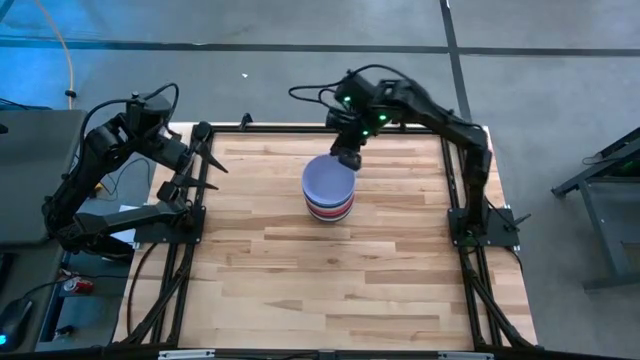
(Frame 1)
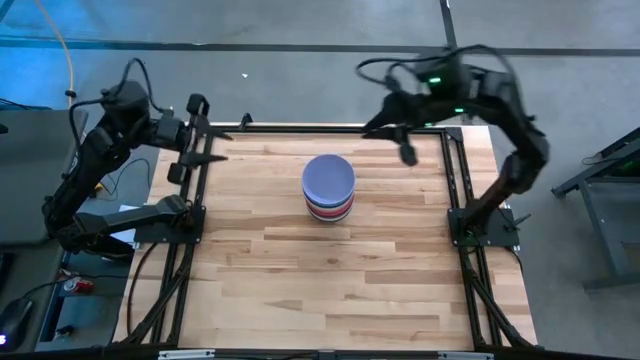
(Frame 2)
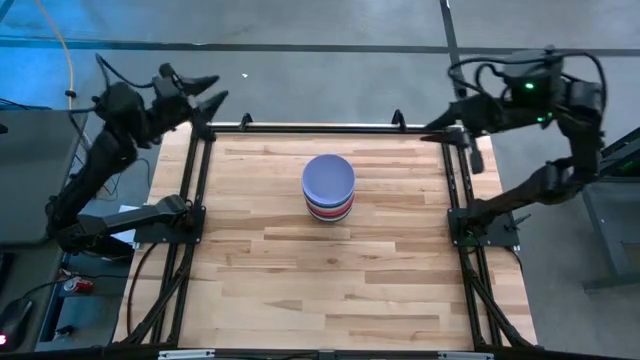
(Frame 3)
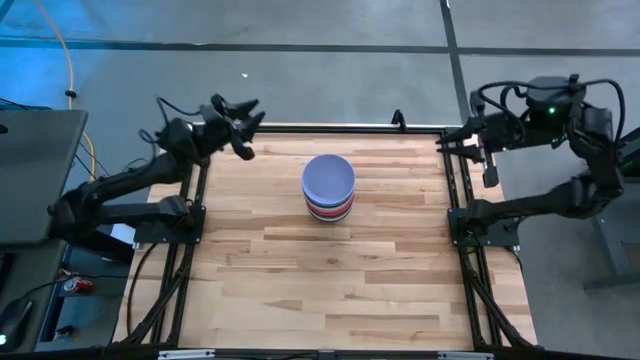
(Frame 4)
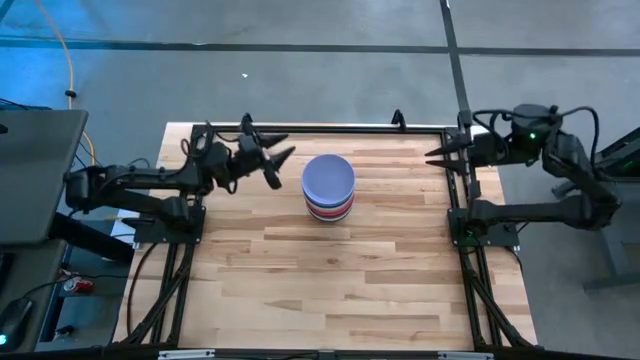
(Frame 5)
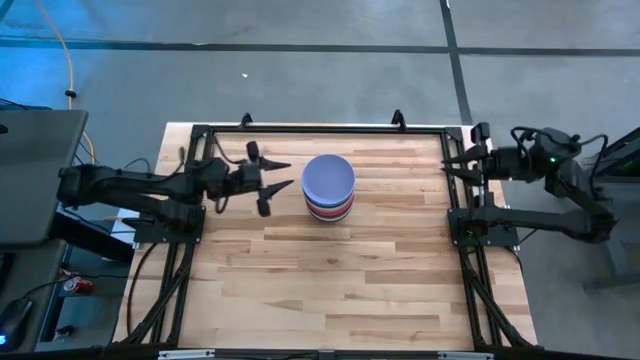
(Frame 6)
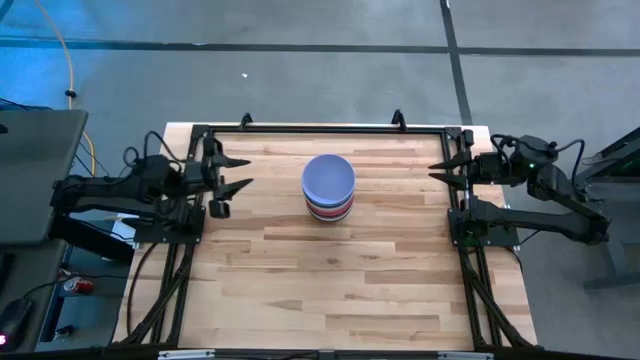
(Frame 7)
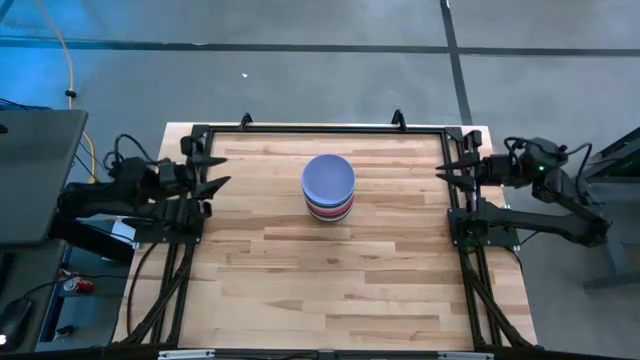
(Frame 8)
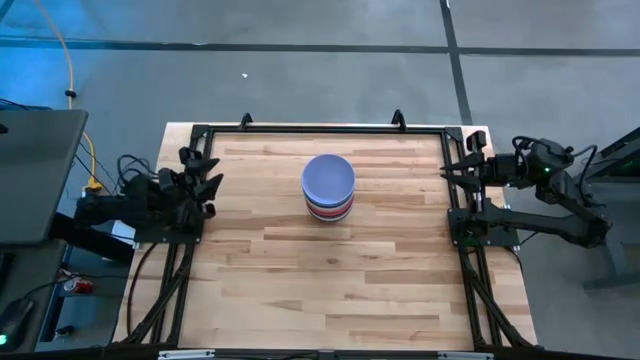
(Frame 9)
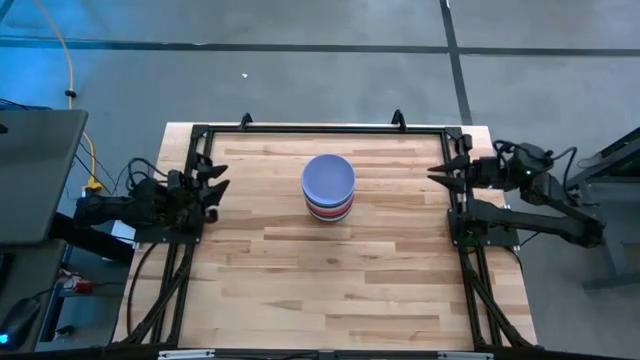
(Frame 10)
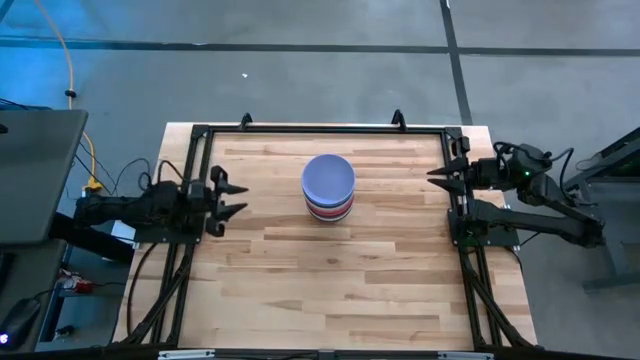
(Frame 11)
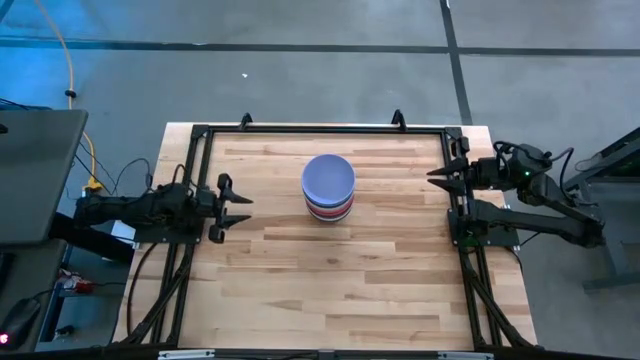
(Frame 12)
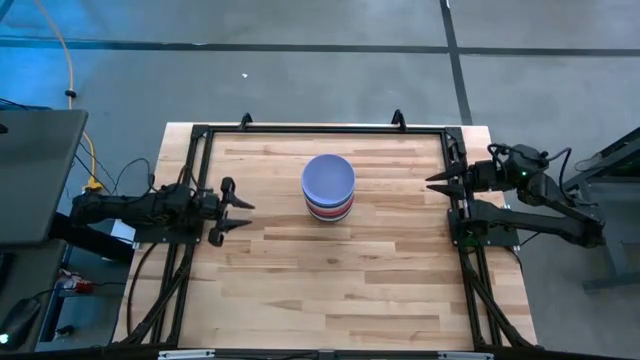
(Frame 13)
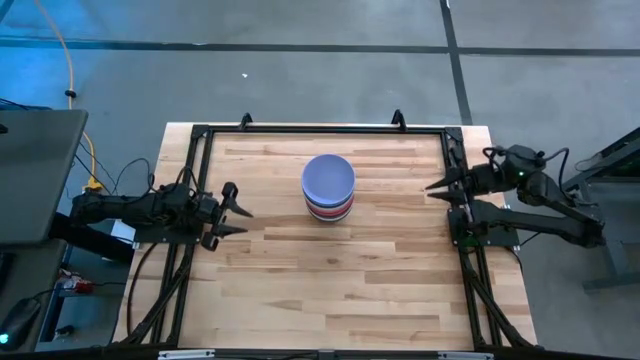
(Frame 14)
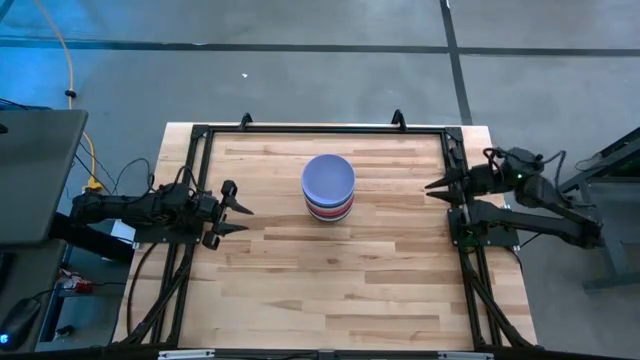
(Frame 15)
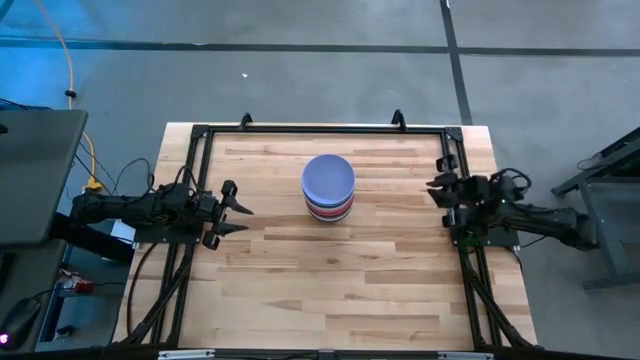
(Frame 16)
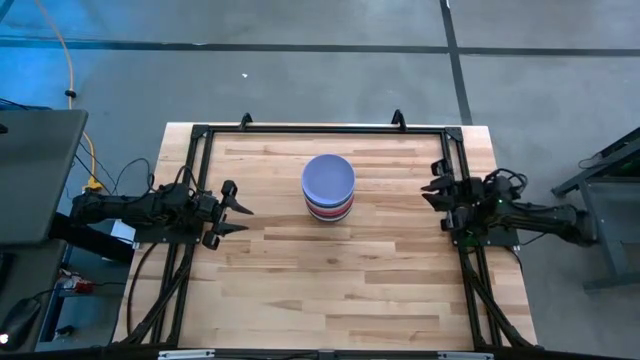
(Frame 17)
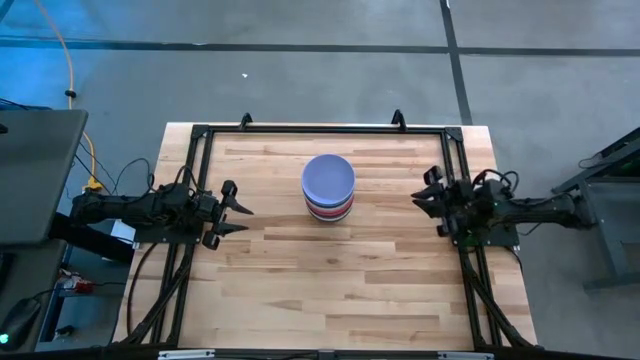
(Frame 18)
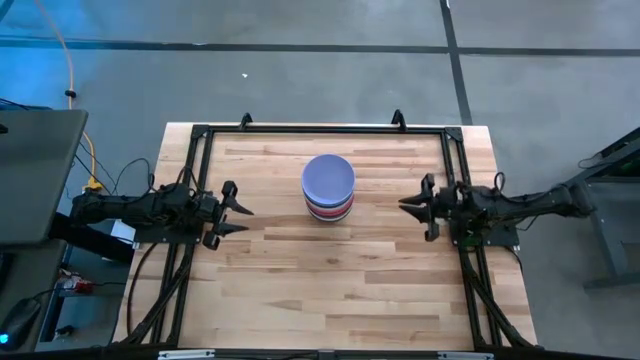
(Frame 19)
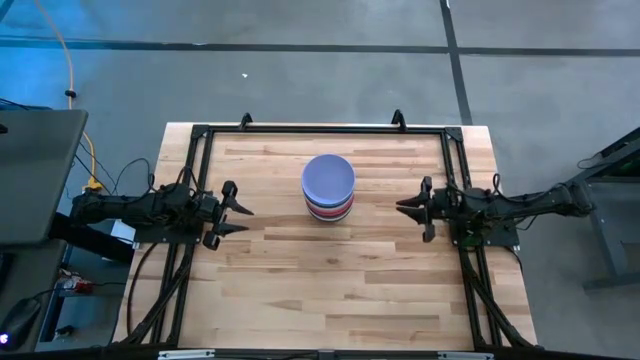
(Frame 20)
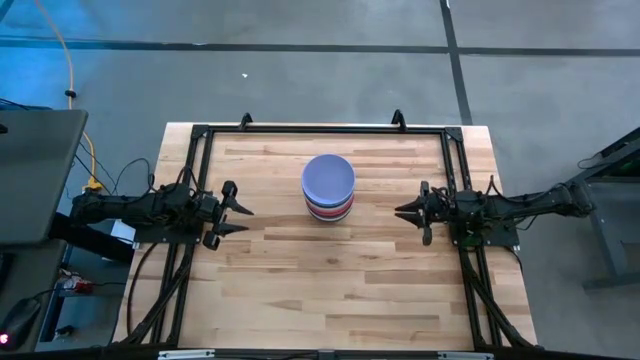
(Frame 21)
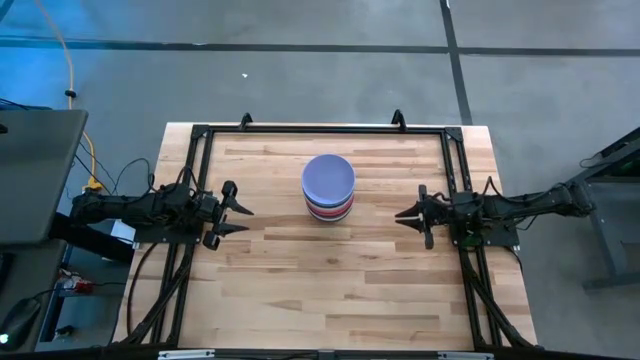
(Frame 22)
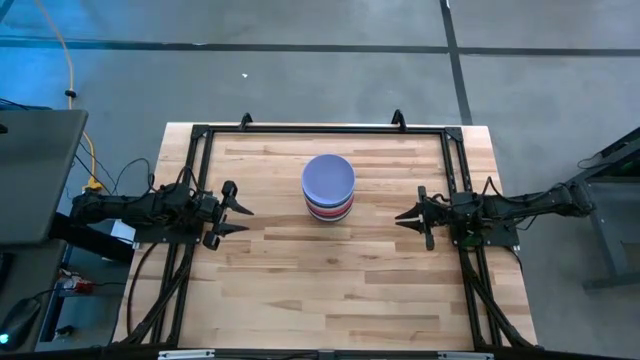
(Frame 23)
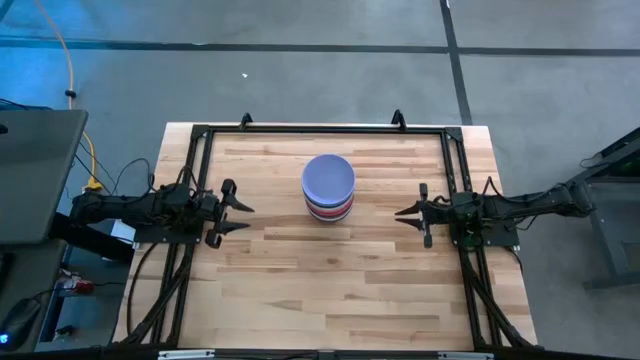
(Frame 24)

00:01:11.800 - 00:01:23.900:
Task: Nest bowls inside each other
Return to Home Position

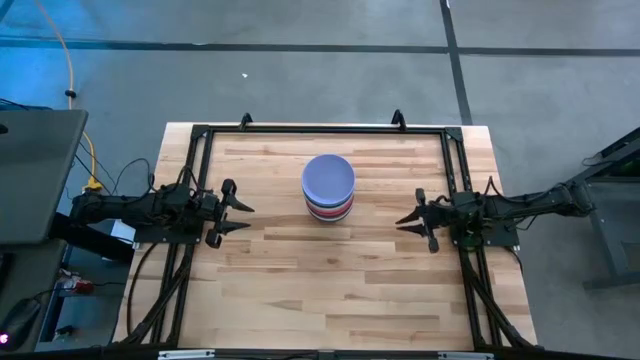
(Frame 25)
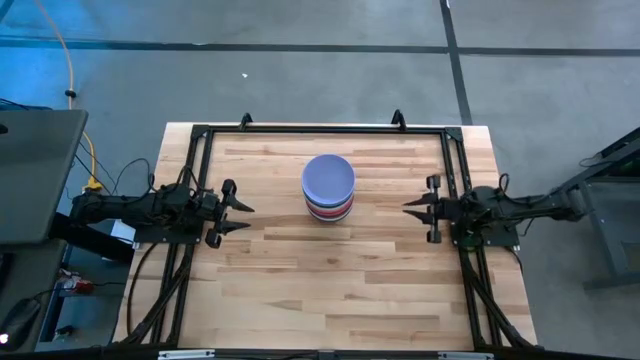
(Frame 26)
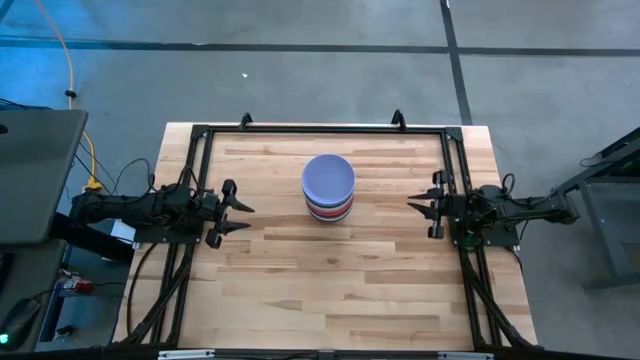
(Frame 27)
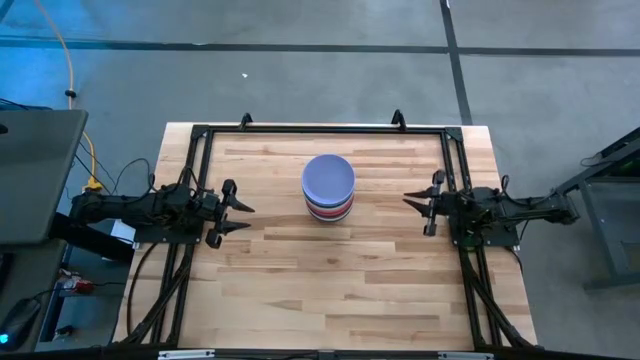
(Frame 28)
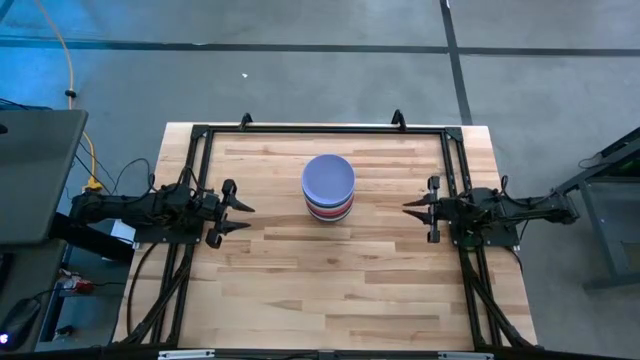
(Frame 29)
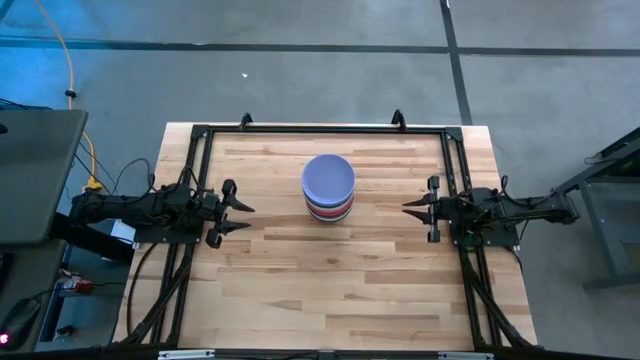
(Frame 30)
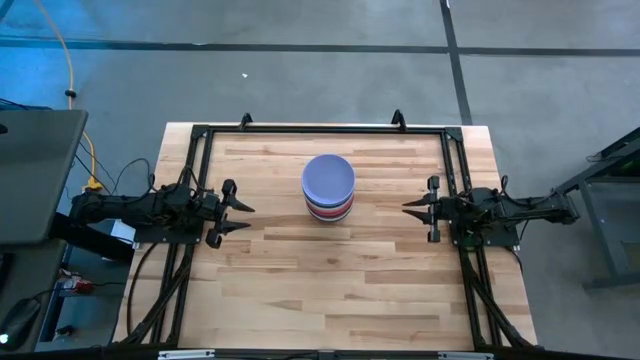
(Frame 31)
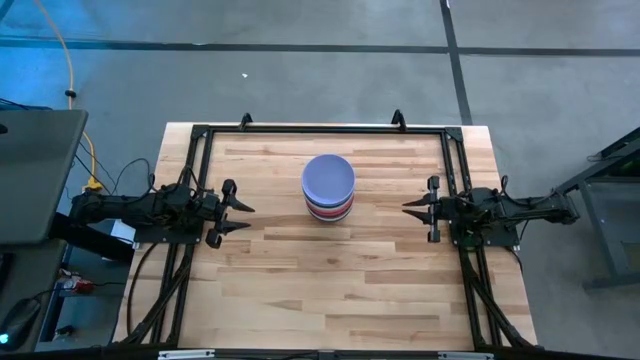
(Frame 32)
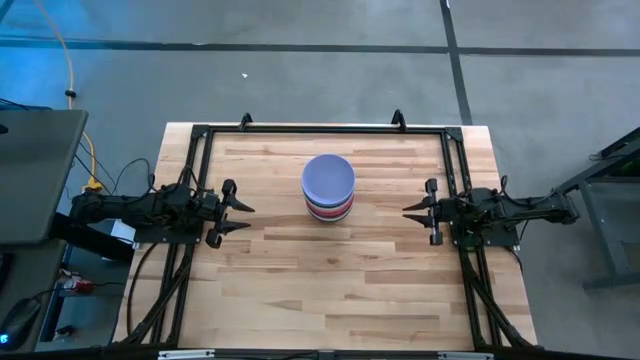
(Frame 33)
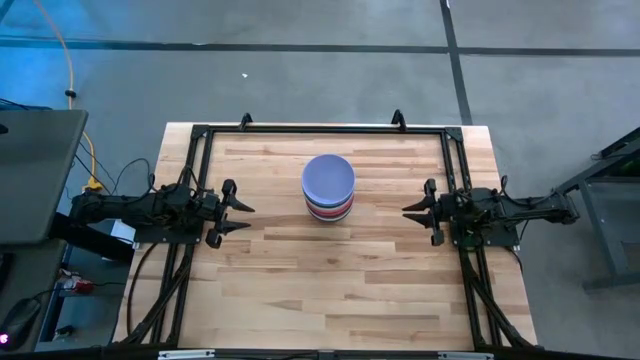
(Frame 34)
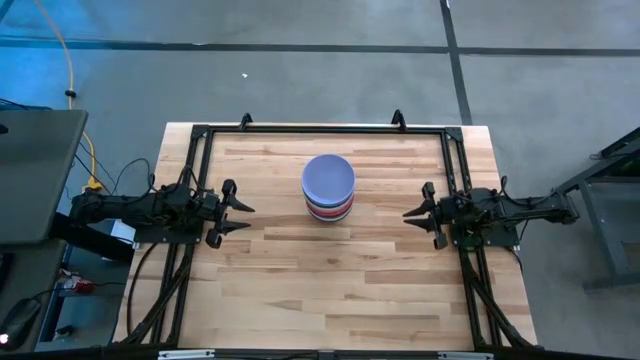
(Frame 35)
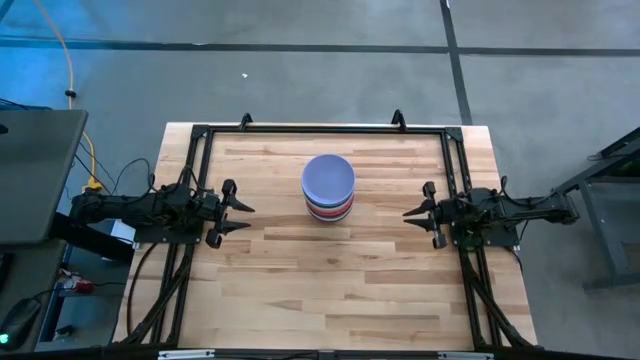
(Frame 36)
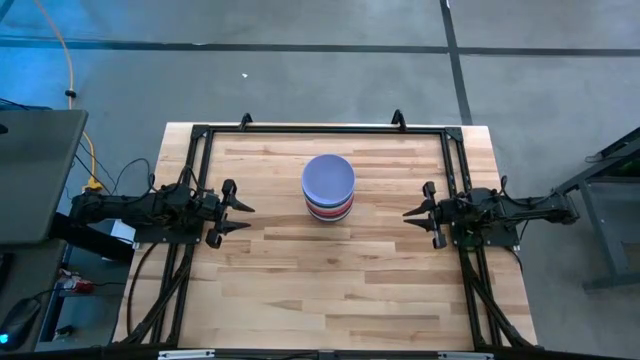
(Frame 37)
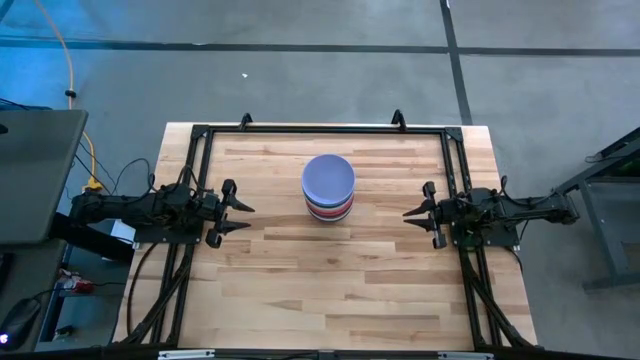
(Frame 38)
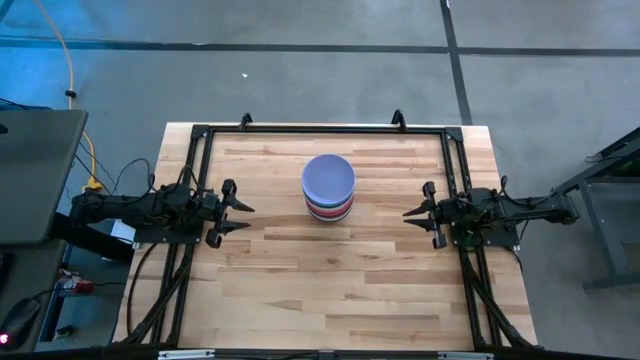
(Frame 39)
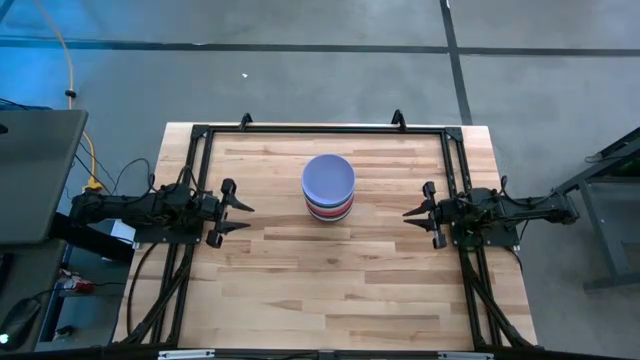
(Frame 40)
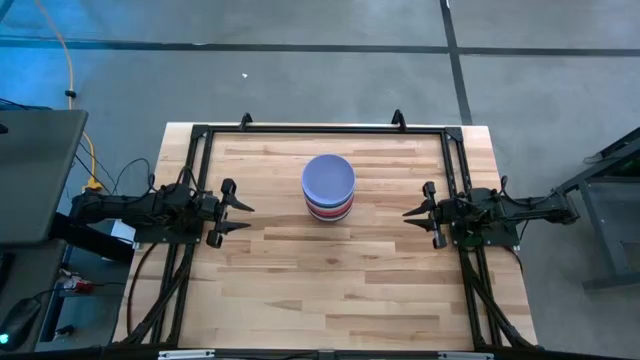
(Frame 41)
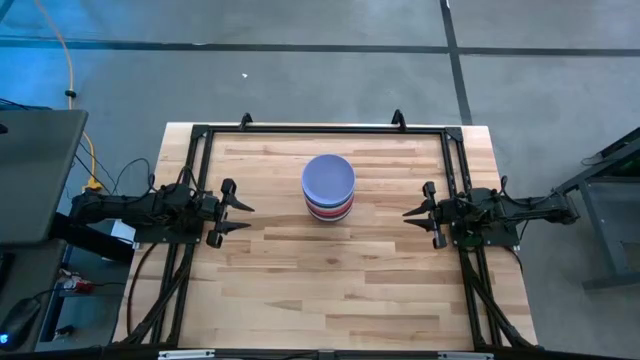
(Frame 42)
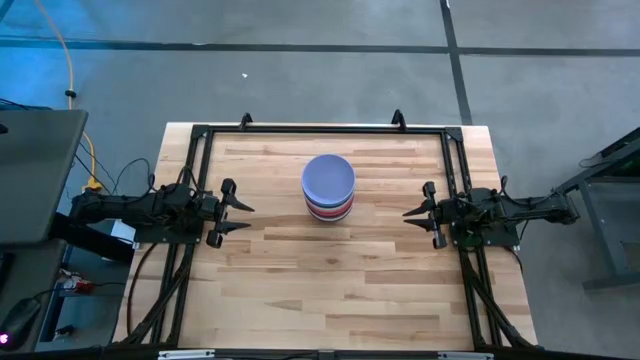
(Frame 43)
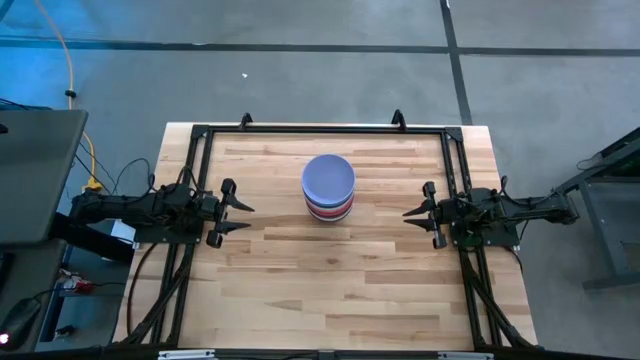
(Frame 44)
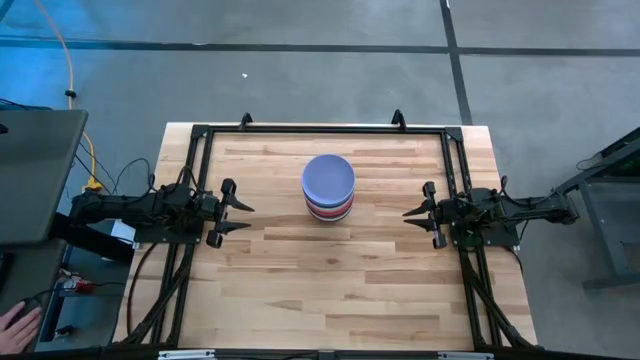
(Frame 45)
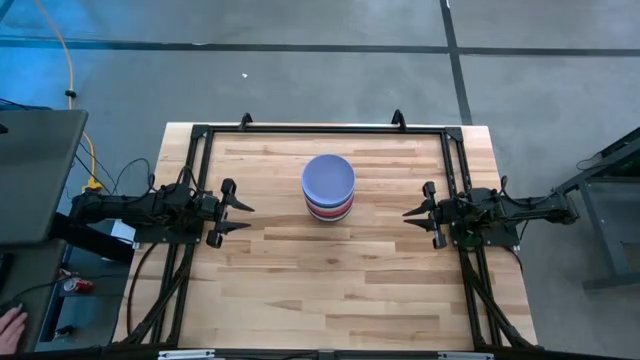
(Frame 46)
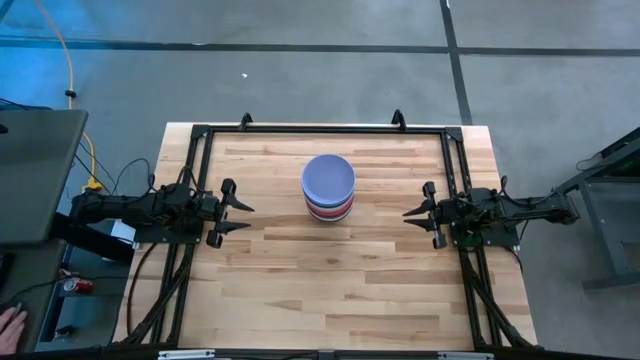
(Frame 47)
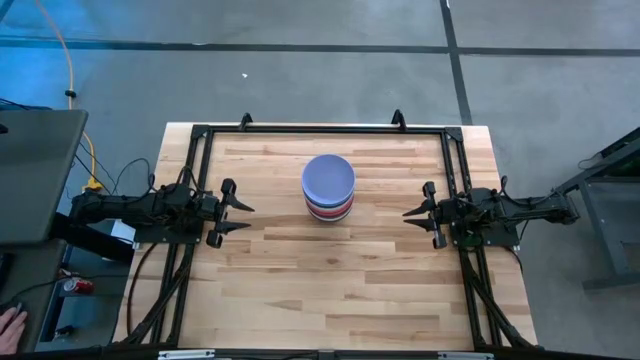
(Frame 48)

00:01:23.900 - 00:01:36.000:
Return to Home Position
